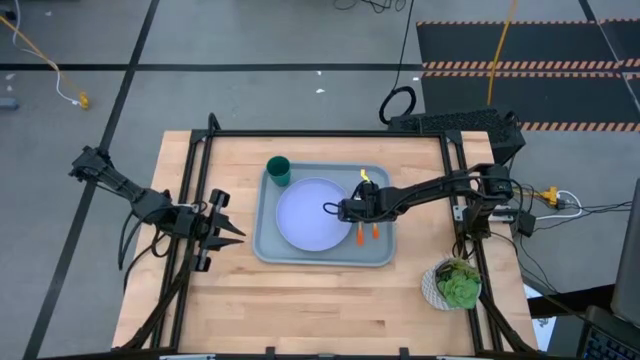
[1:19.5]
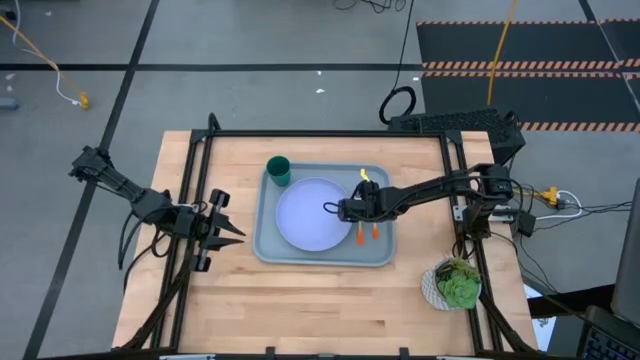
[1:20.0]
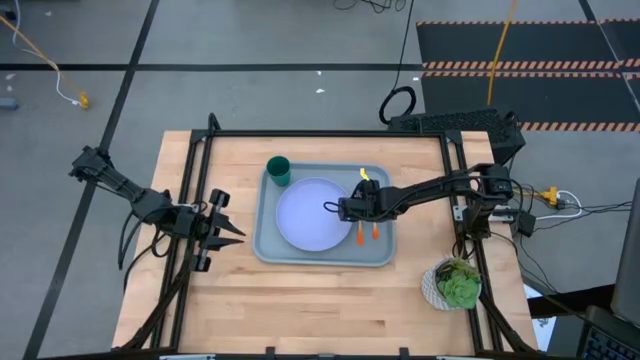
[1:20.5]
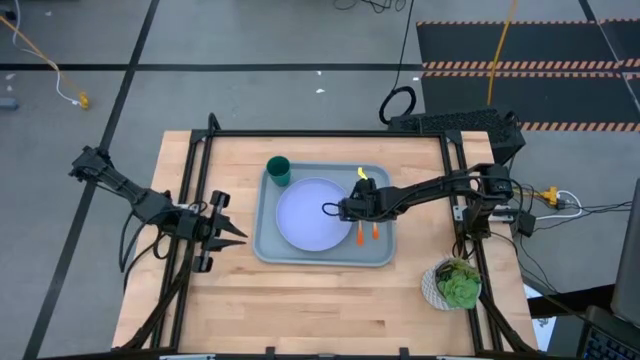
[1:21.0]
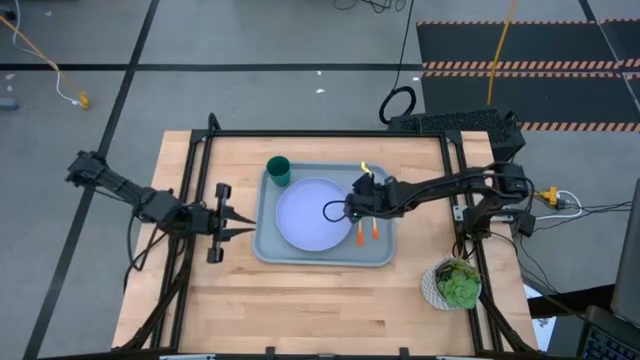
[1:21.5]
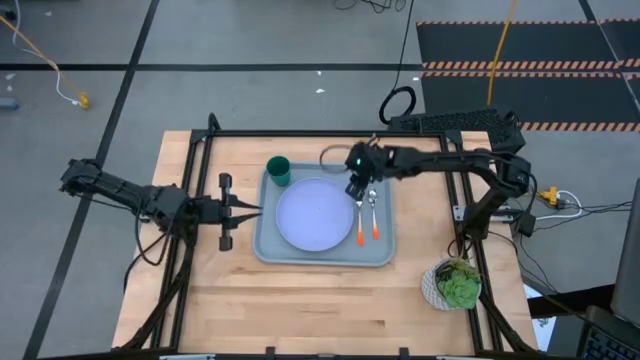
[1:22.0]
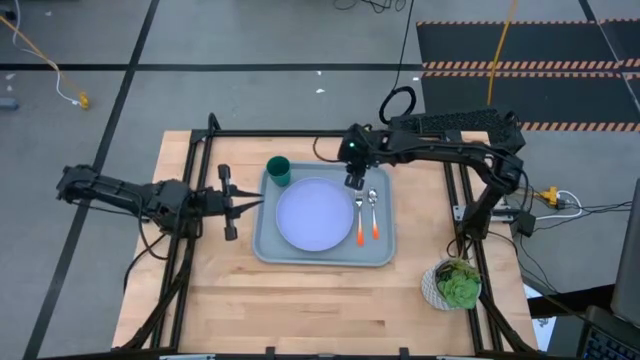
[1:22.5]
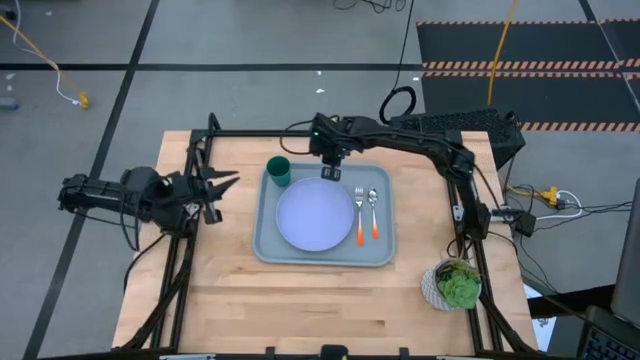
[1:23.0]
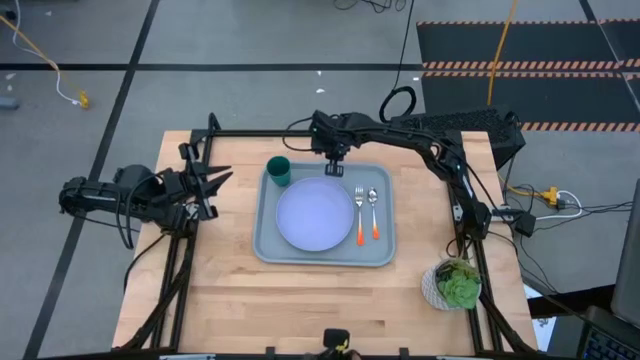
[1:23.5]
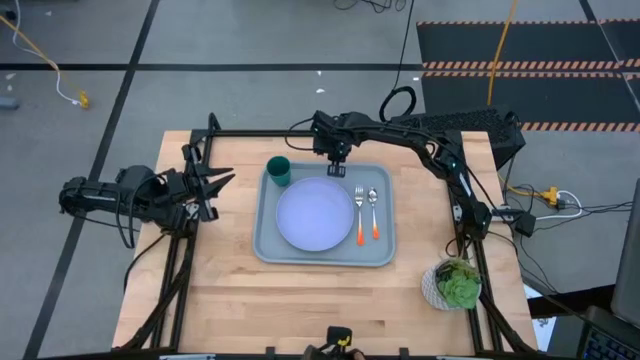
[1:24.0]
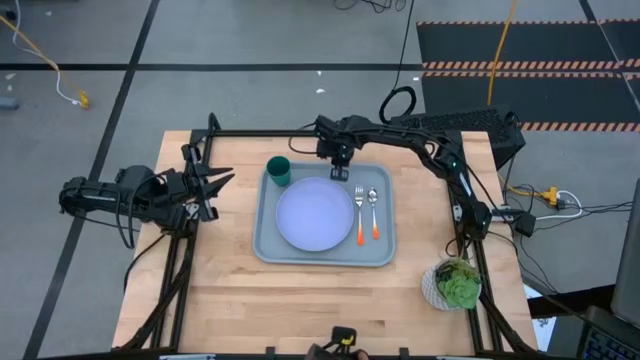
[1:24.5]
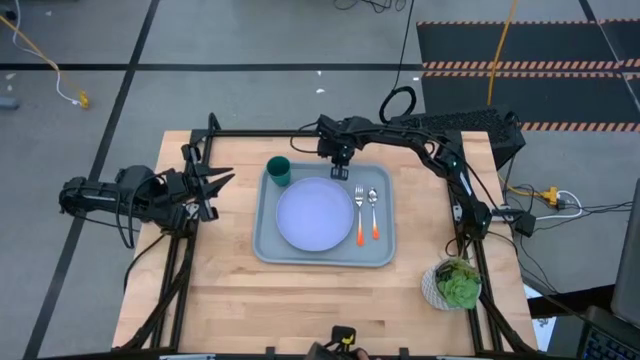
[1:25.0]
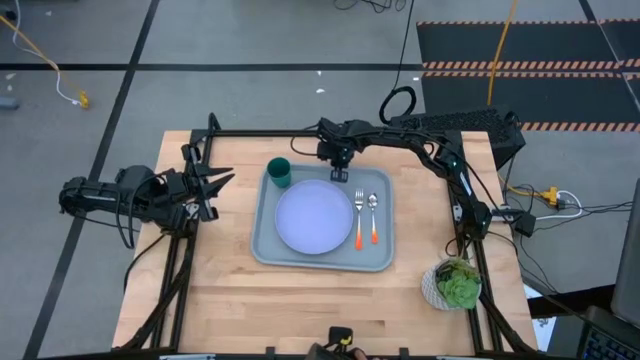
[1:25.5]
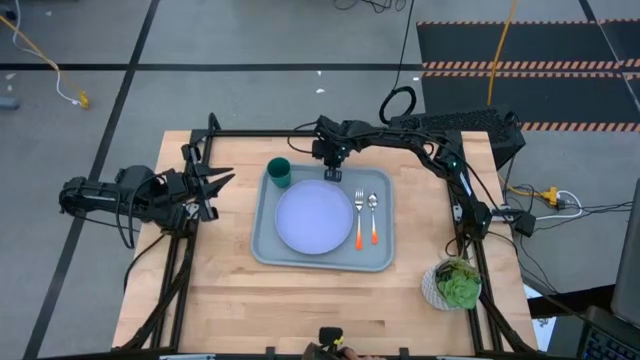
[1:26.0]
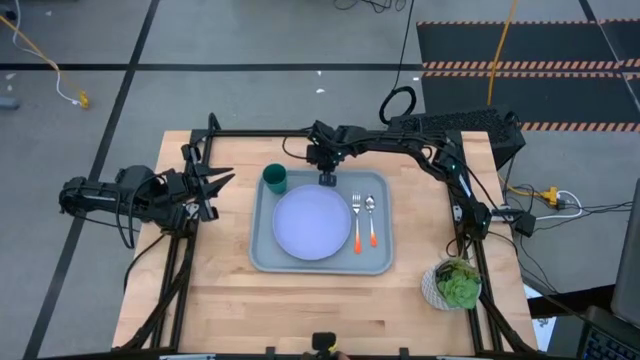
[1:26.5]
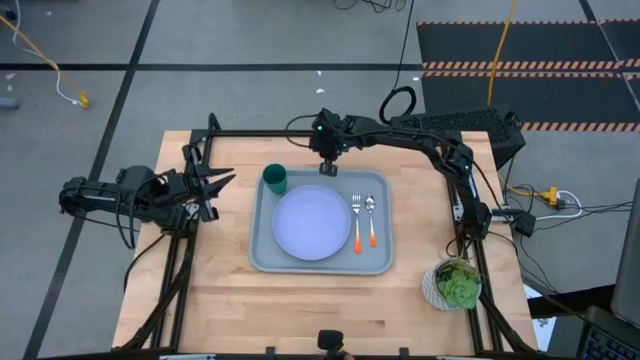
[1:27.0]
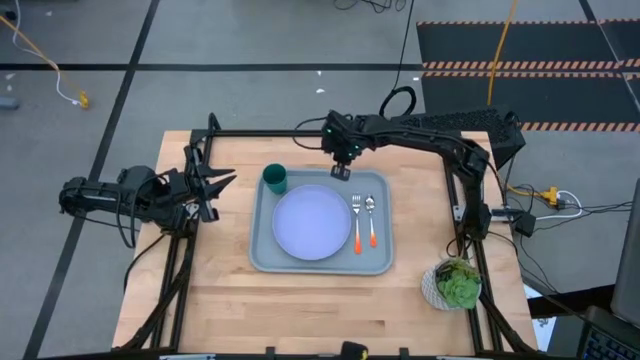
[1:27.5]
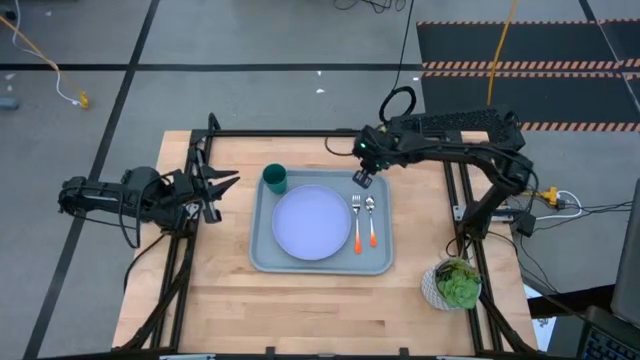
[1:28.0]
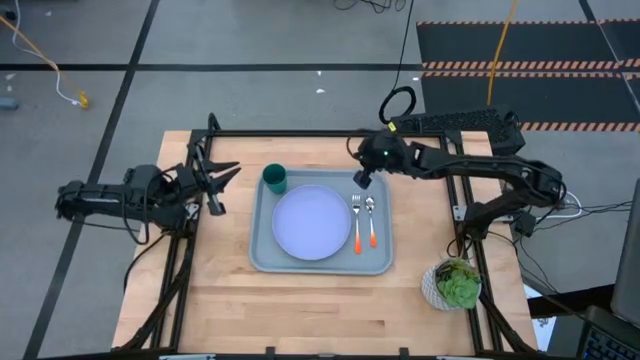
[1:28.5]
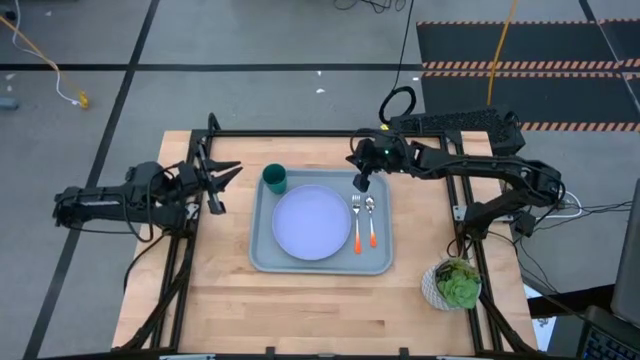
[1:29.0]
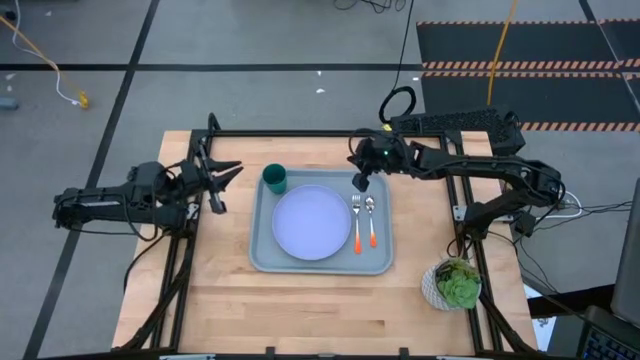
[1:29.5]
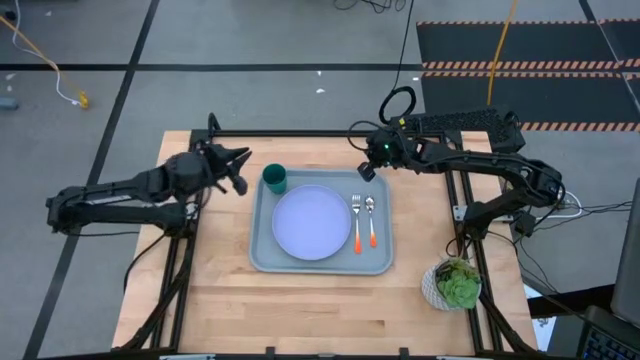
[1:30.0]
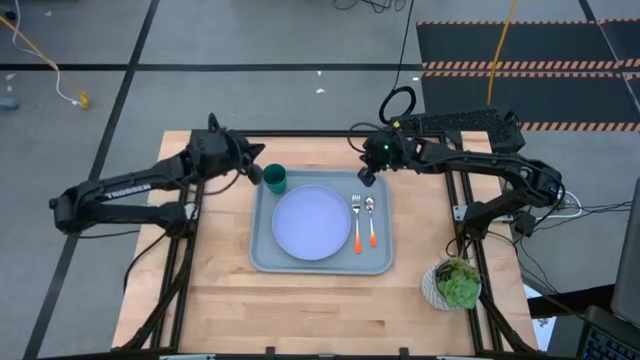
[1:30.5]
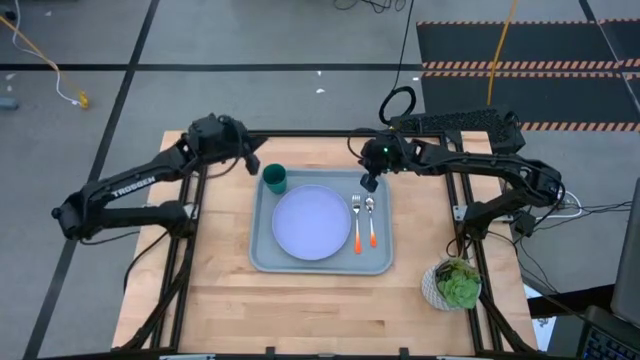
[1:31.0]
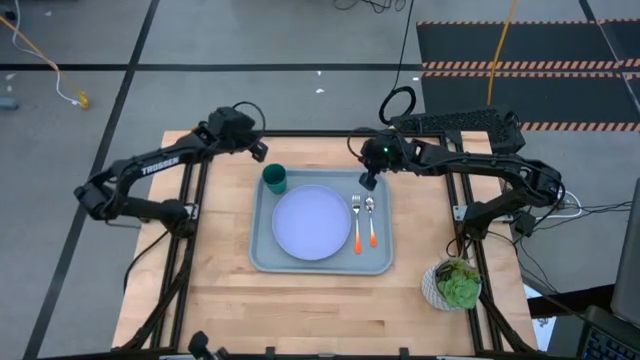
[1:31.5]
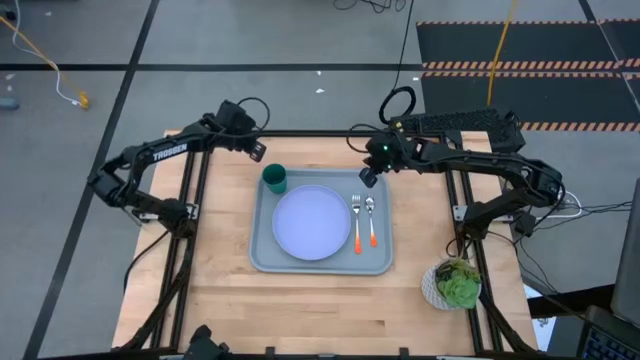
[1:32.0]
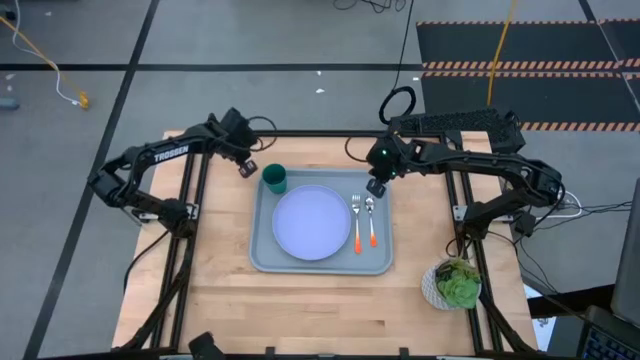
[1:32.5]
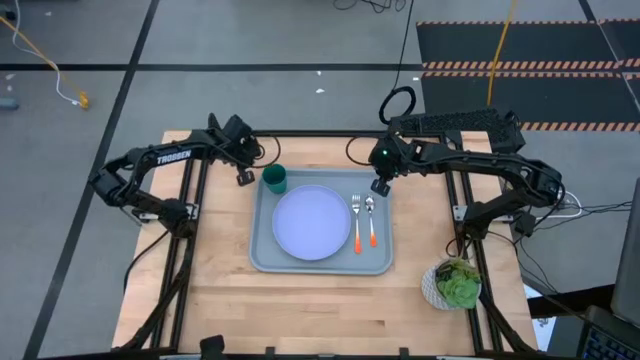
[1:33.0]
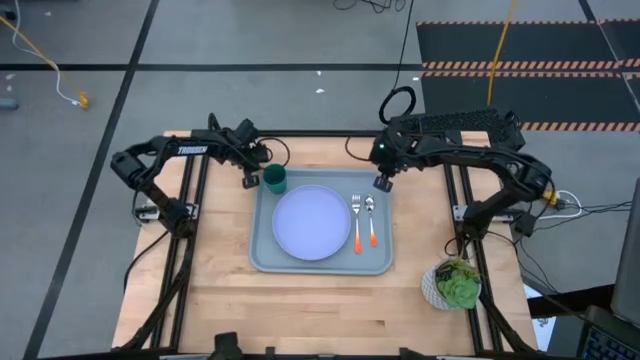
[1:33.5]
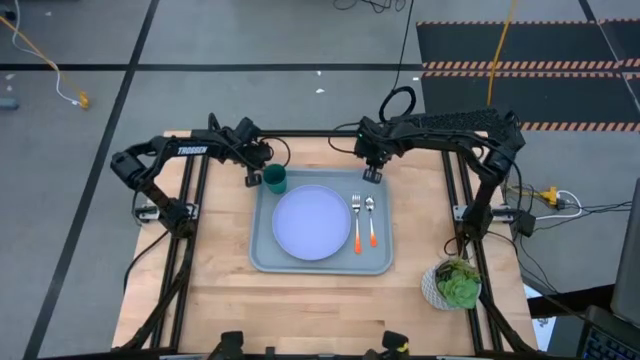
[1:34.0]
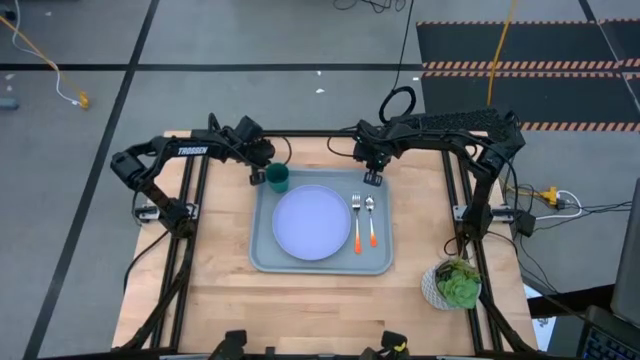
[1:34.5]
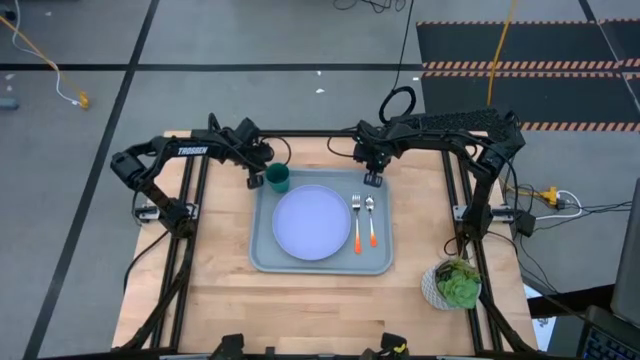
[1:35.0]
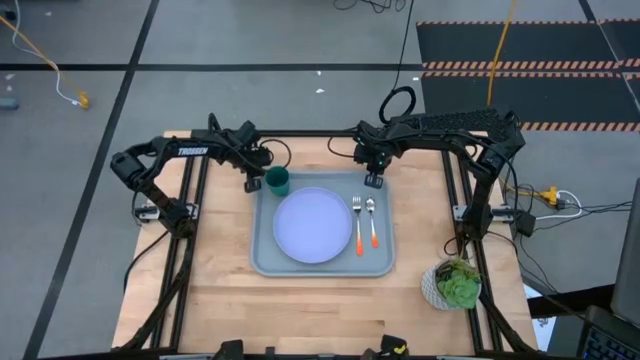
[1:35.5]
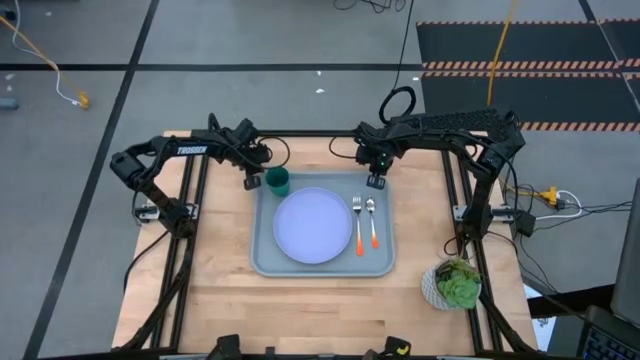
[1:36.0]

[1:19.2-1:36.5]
Task: Pick and place plate/cup/fork/spoon on tray
Adjust the gray serving tray

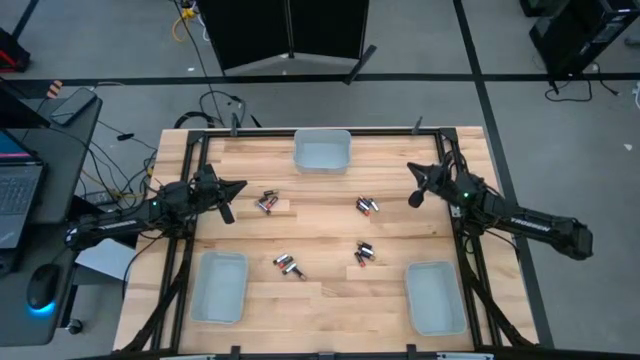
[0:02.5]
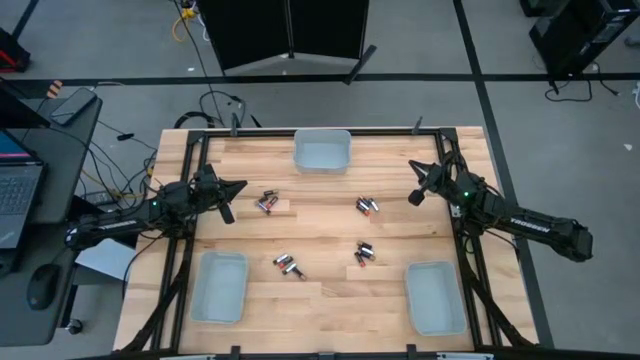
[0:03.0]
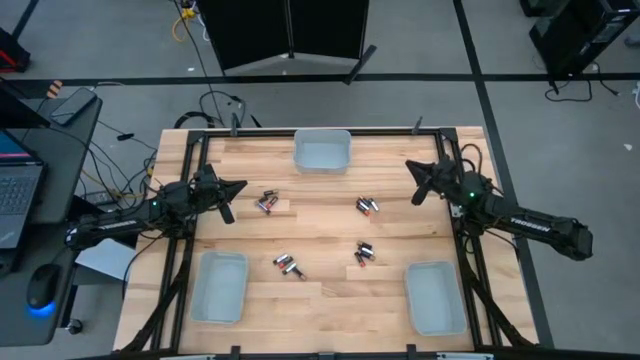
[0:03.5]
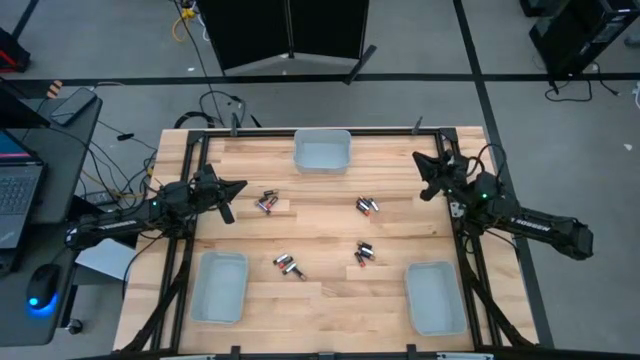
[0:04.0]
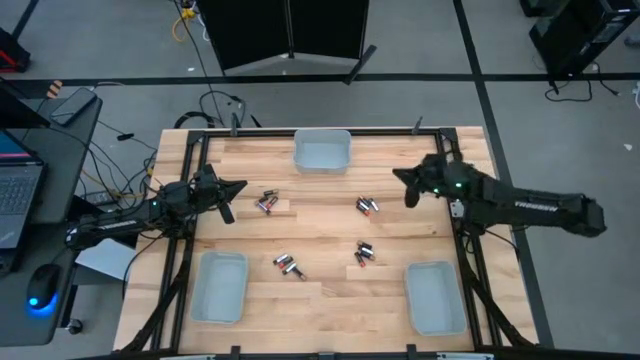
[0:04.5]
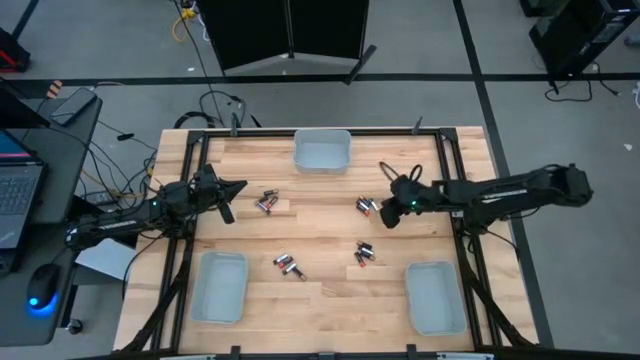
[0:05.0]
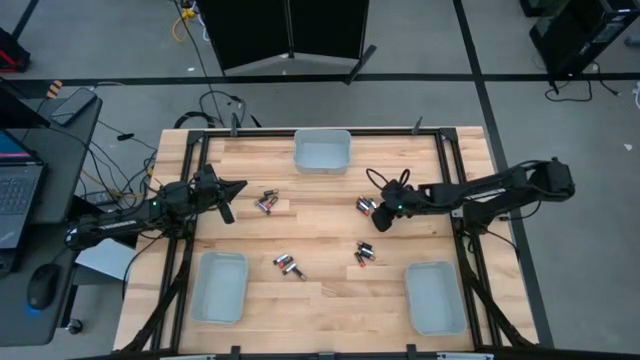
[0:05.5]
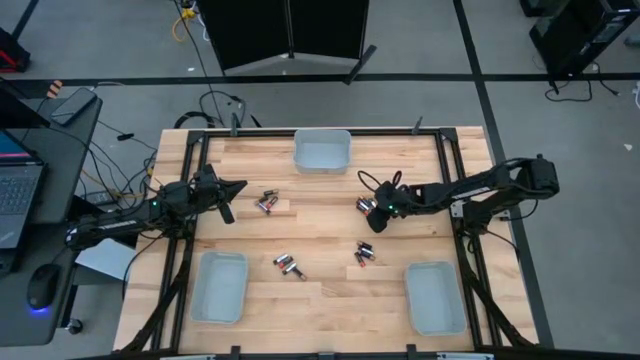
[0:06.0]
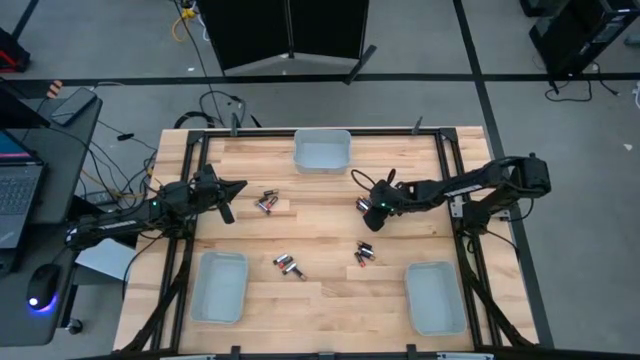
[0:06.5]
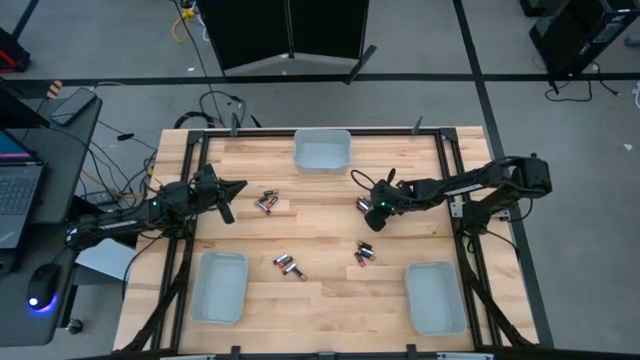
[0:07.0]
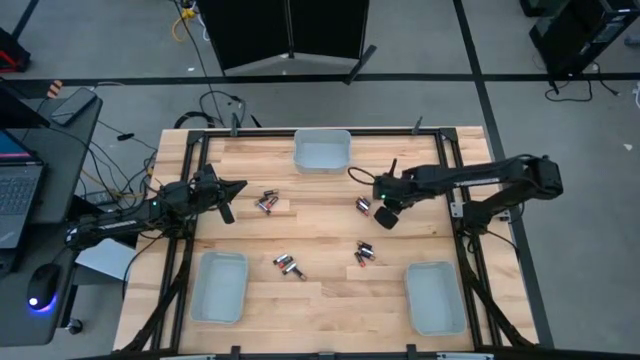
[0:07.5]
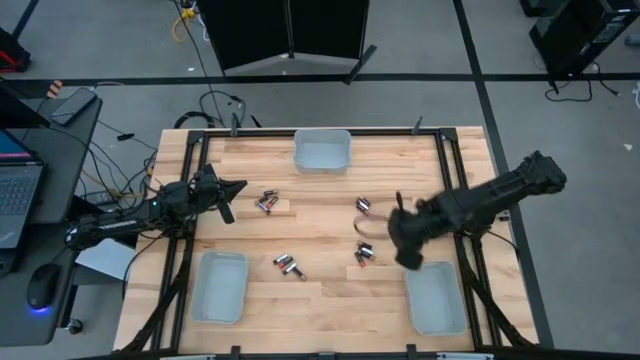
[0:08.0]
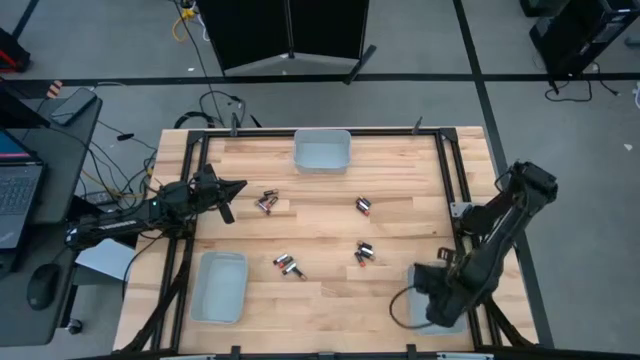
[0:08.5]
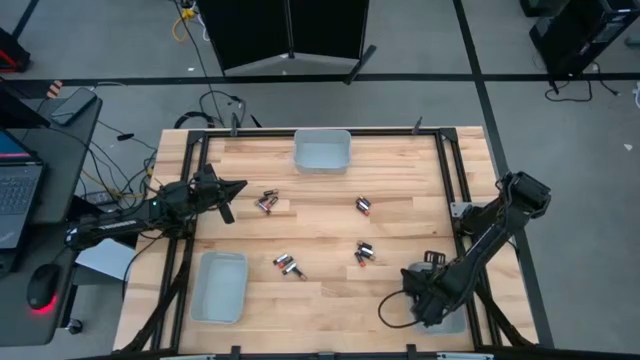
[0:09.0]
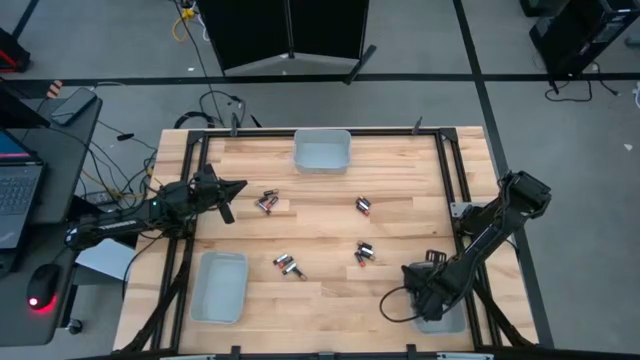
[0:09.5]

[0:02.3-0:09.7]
Task: Sort batteries
Put the silver battery into the bottom right gray bin
